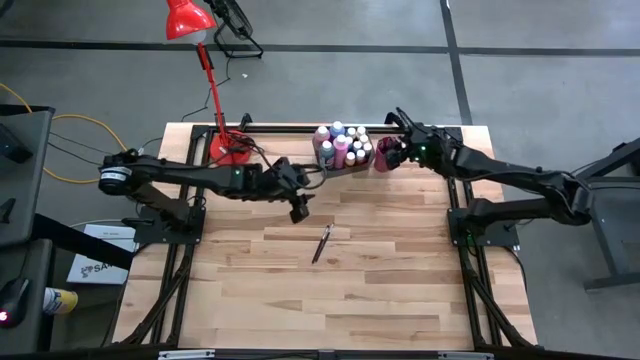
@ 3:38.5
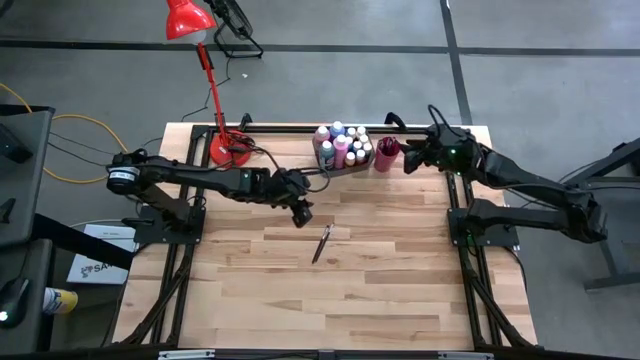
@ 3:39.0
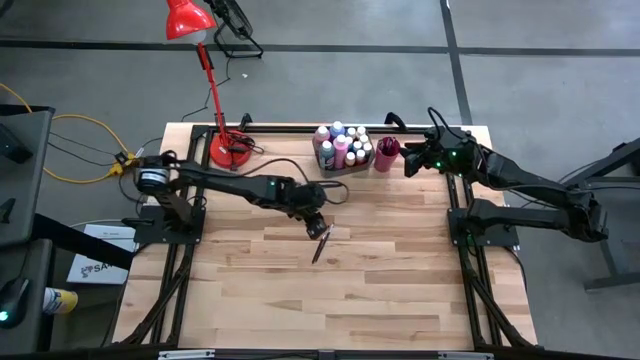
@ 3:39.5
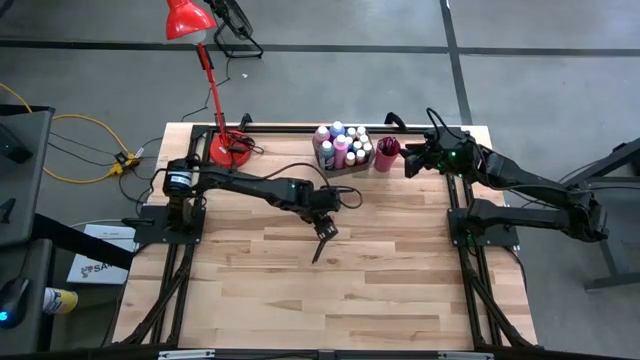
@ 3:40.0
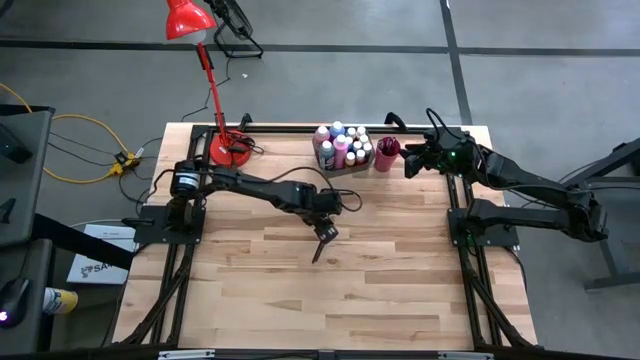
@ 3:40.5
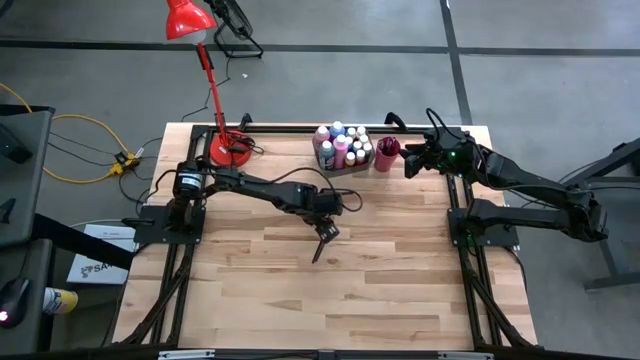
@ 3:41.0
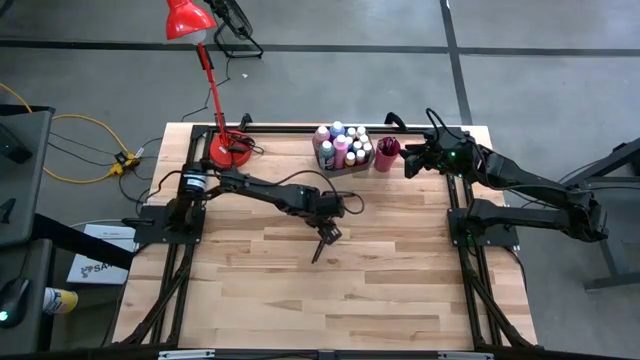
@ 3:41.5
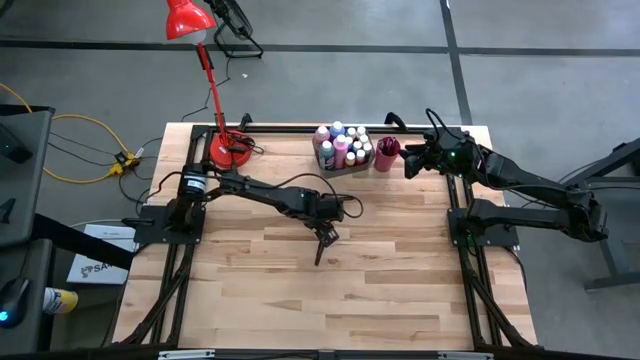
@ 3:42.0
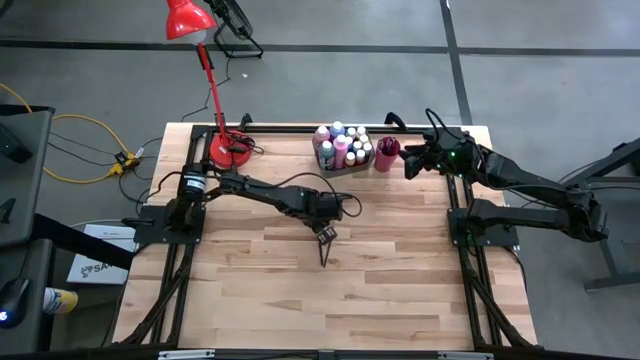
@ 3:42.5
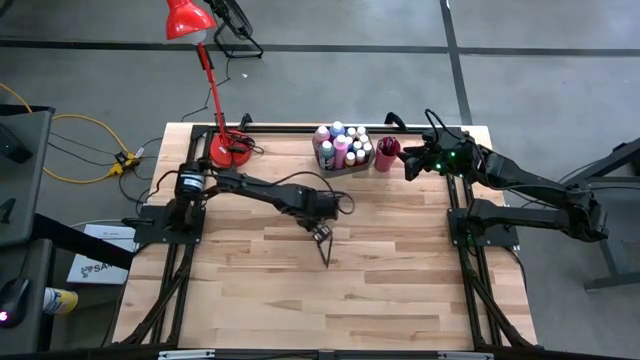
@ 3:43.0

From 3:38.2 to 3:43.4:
Task: Pick & Place Paint Supplies
Put the black paintbrush into the red cup

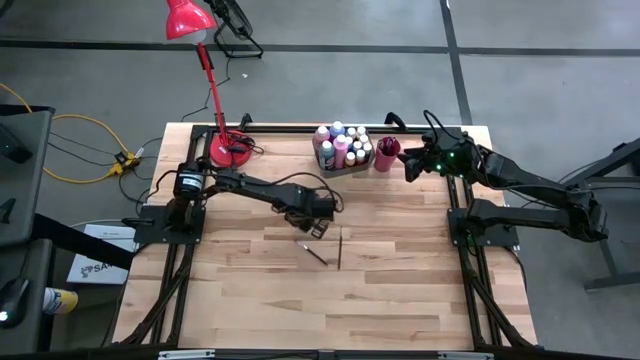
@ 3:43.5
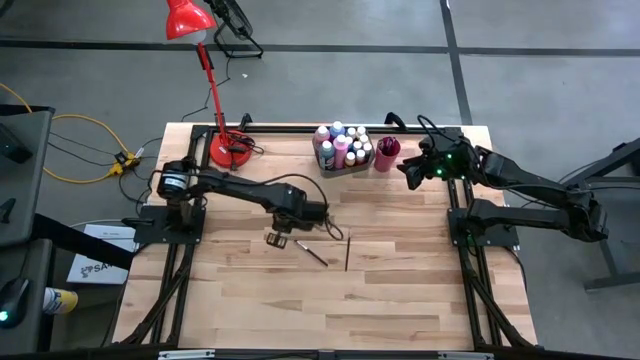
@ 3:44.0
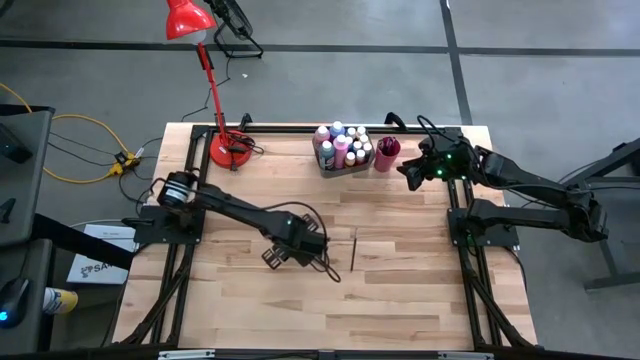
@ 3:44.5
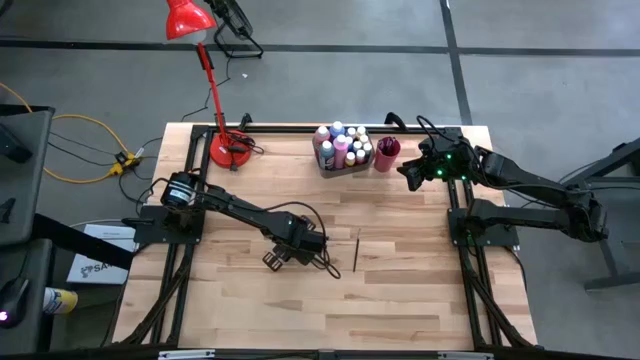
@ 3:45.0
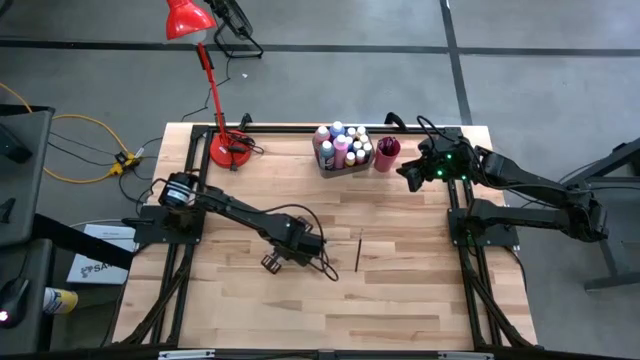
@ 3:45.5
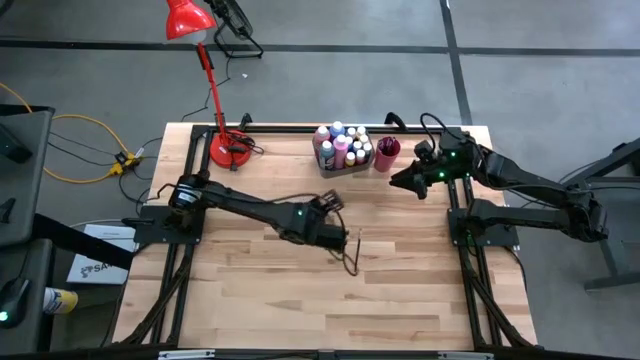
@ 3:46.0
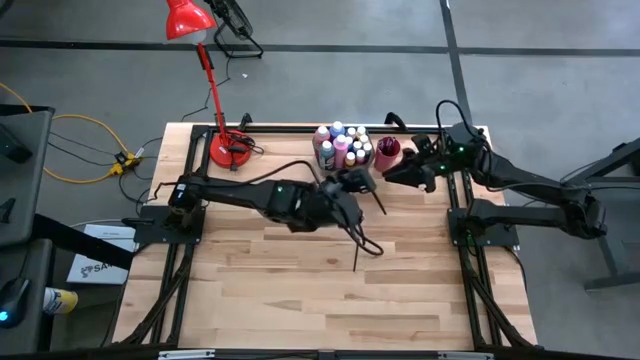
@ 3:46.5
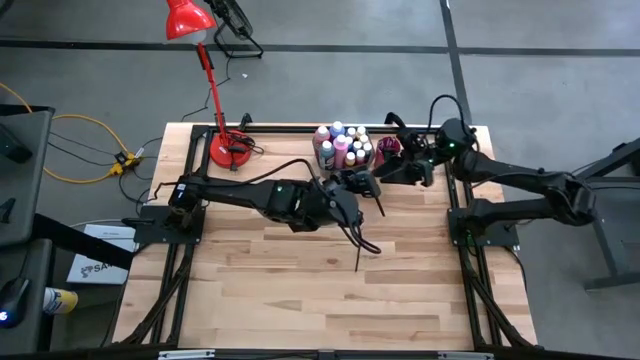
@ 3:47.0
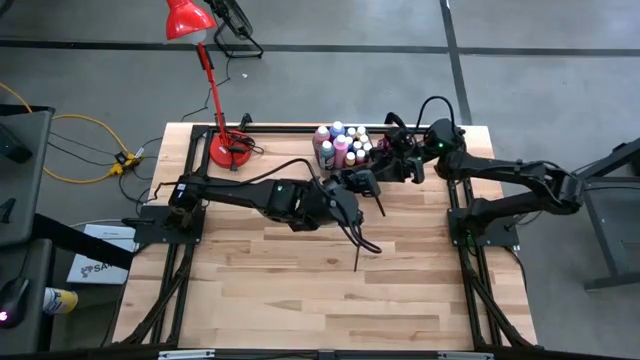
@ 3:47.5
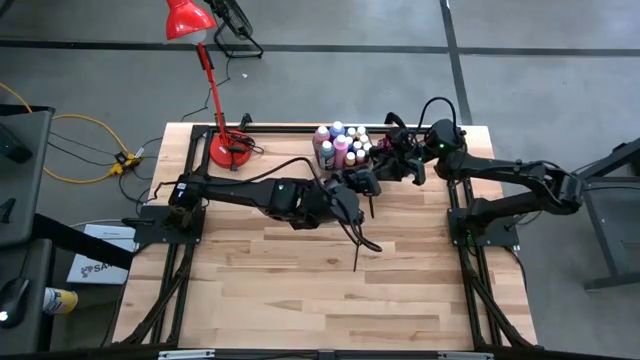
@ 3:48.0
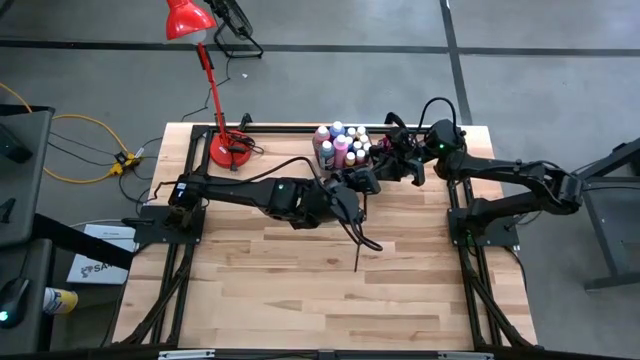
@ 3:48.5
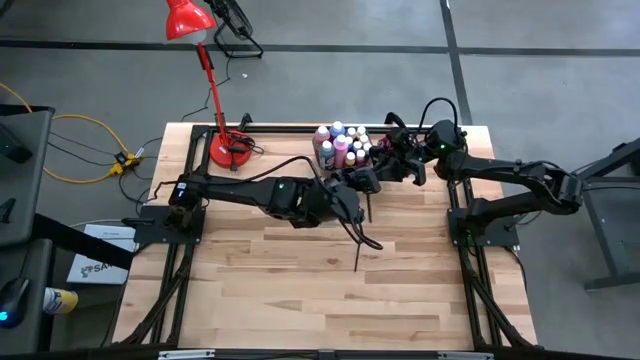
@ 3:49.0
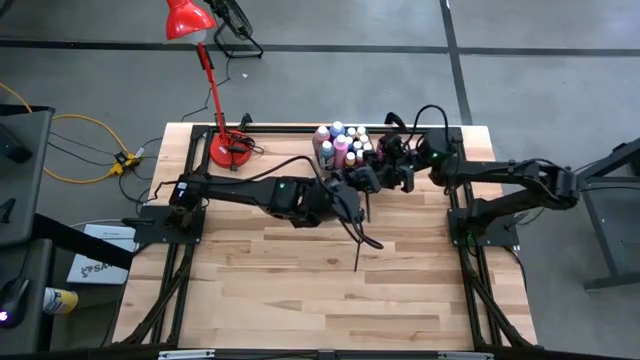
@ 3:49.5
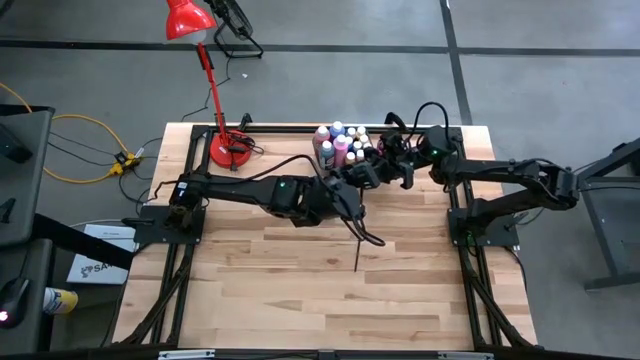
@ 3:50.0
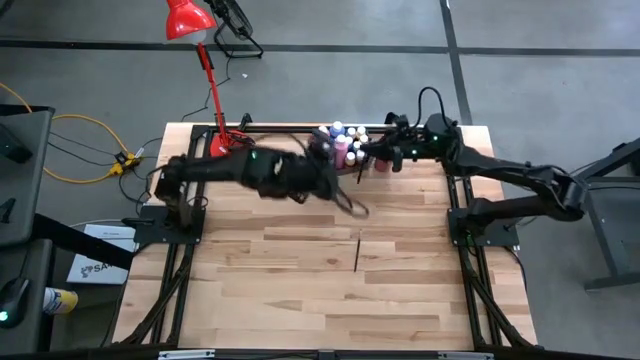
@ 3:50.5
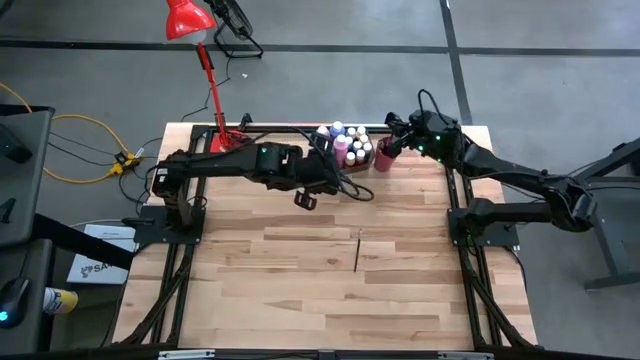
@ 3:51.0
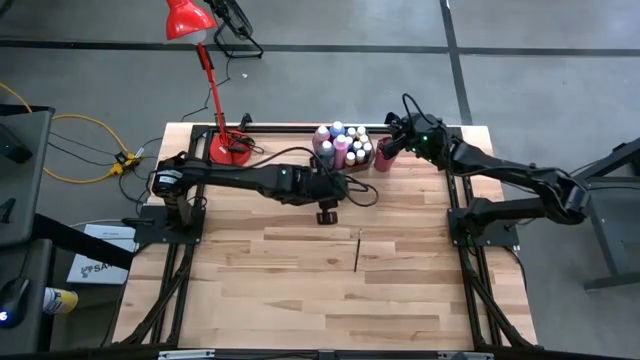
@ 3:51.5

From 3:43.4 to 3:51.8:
Put the black paintbrush into the red cup

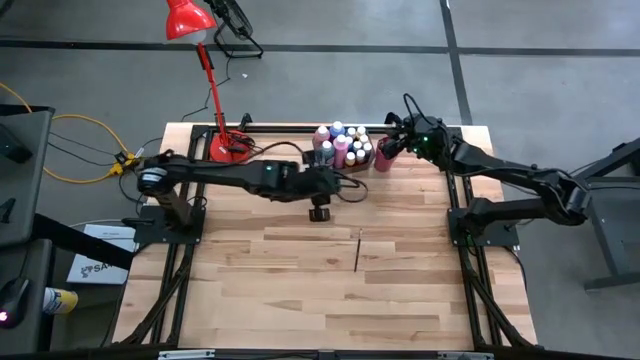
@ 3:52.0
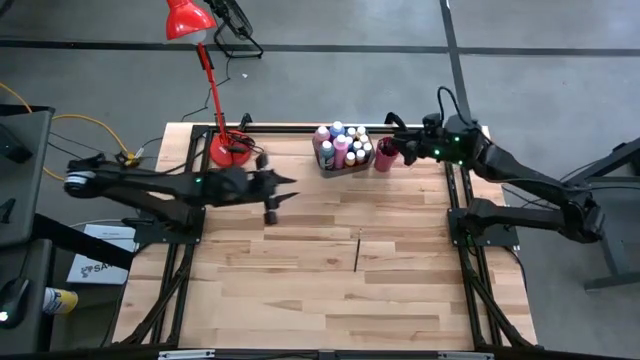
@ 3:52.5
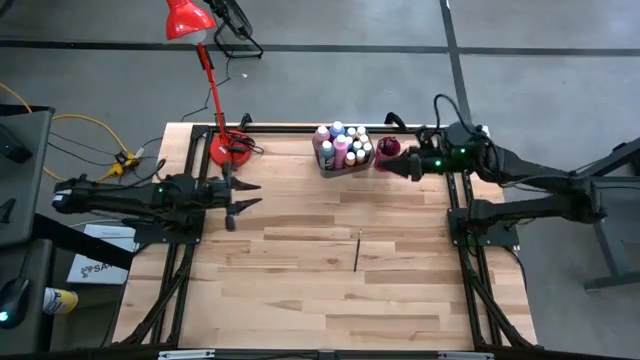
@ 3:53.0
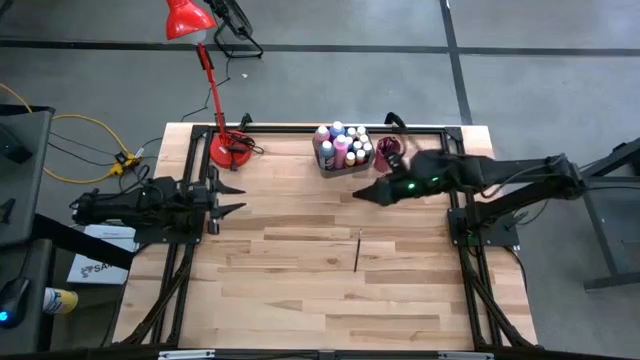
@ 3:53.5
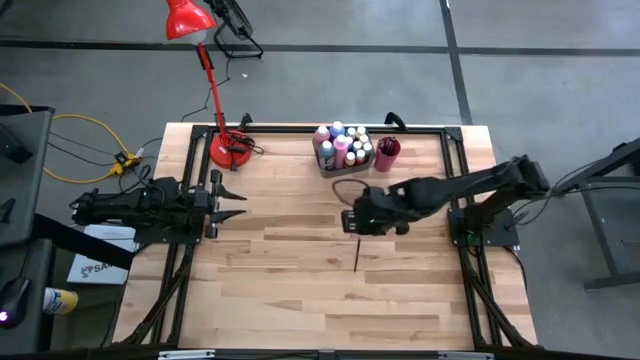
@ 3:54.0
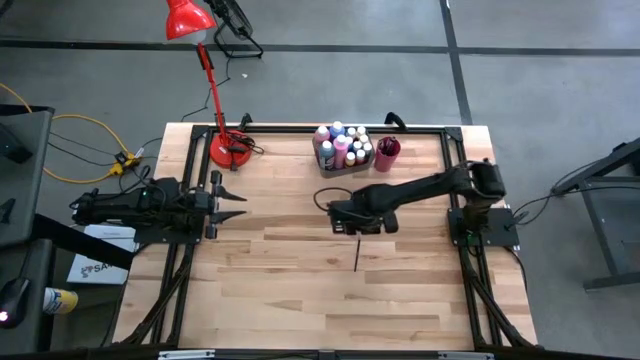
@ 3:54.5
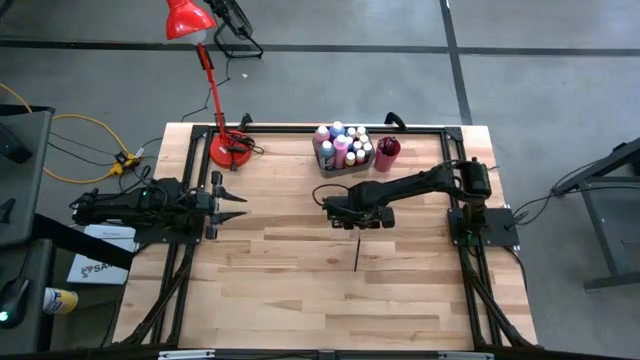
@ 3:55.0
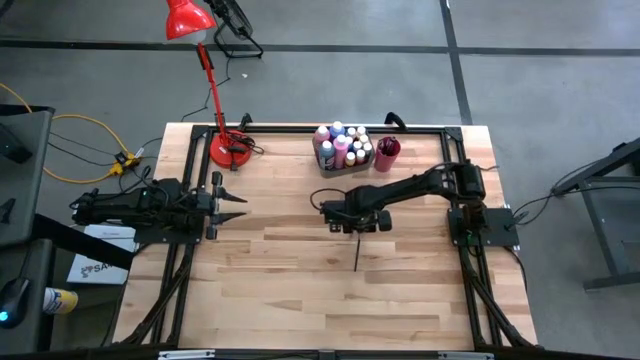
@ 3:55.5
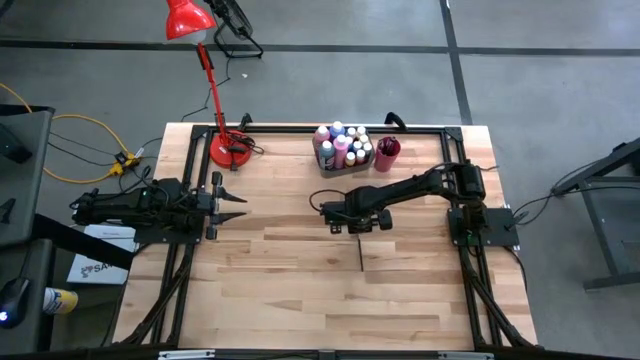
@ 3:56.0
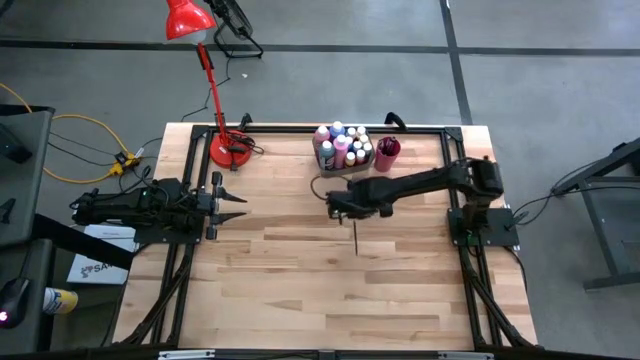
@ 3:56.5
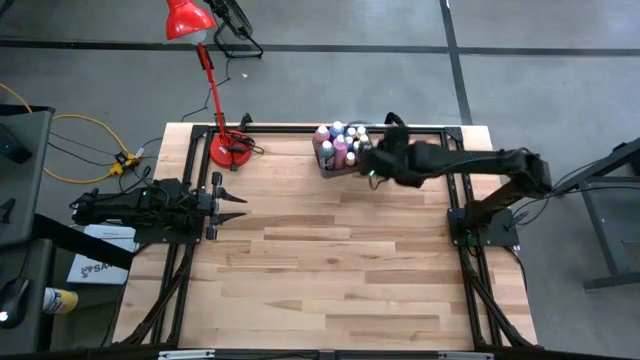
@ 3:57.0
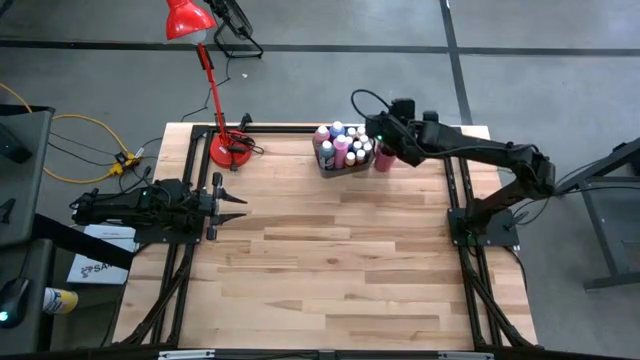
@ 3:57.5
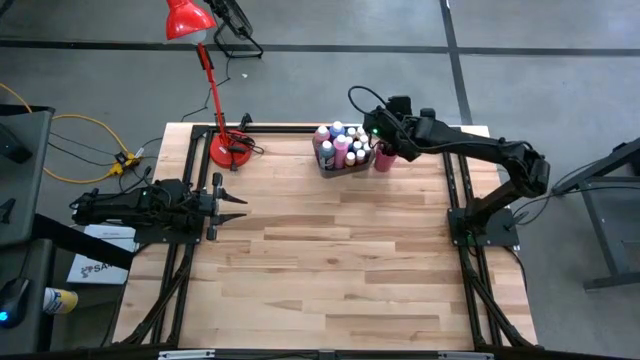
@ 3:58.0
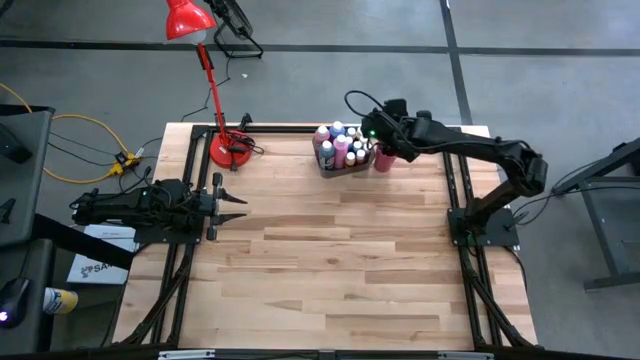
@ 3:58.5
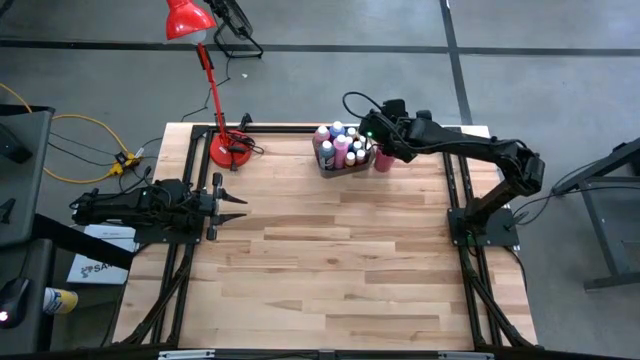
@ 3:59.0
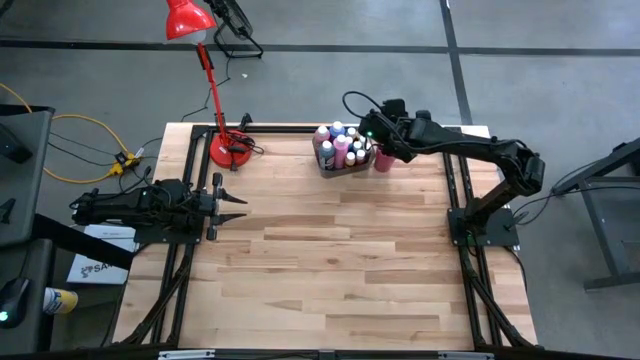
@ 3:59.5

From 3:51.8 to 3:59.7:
Put the black paintbrush into the red cup
